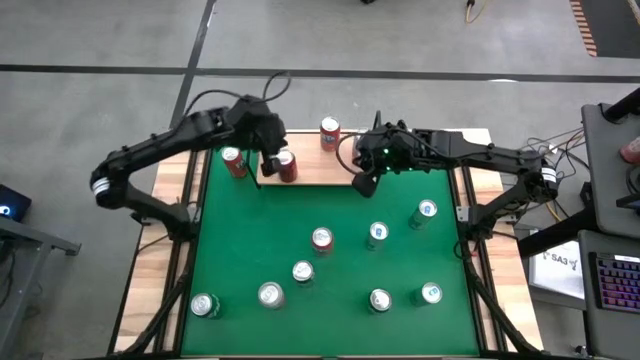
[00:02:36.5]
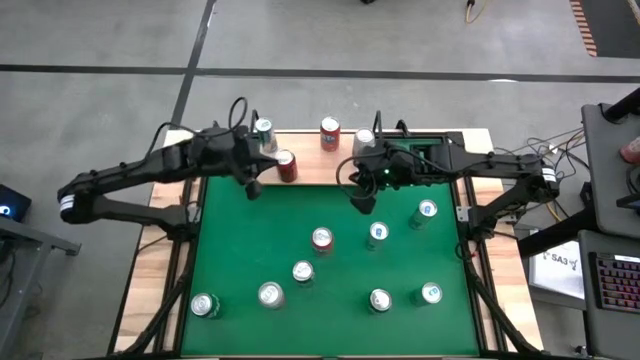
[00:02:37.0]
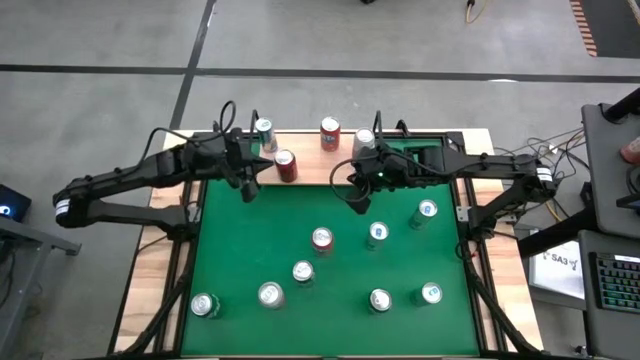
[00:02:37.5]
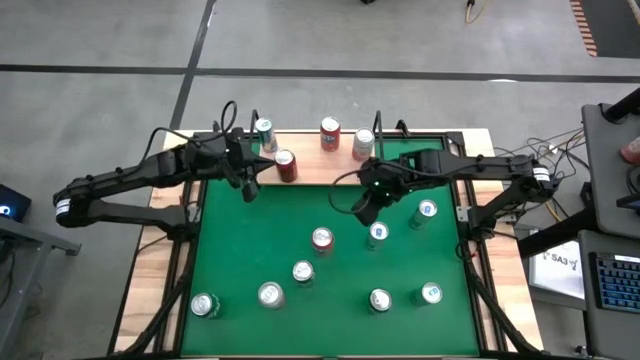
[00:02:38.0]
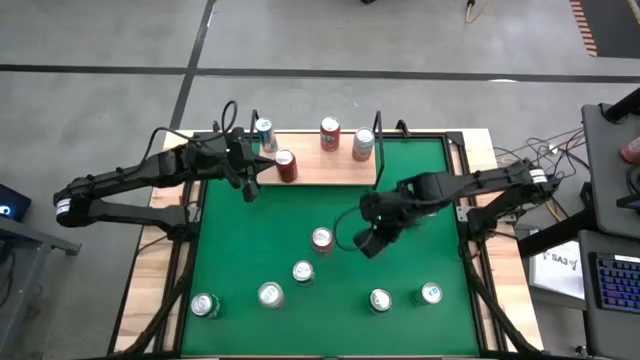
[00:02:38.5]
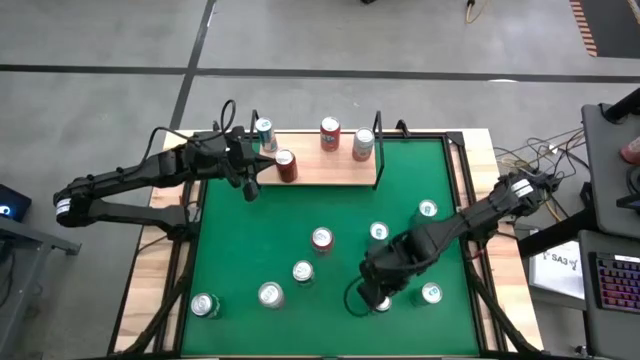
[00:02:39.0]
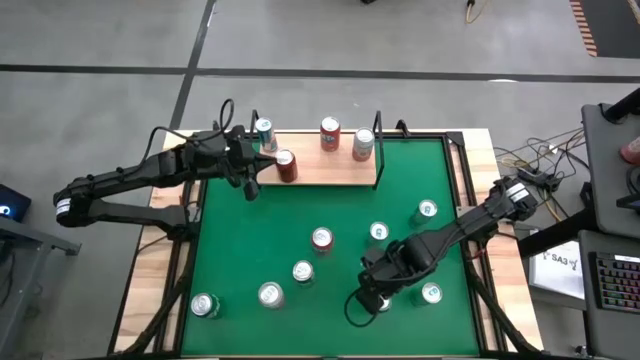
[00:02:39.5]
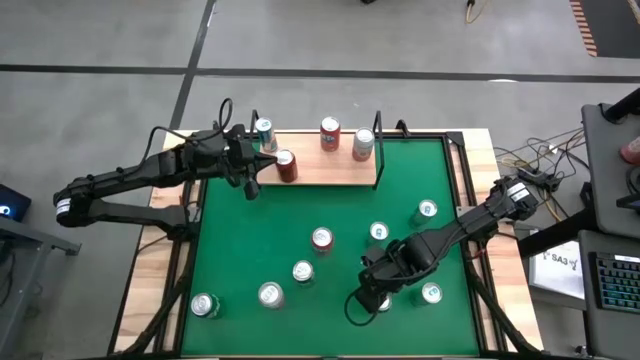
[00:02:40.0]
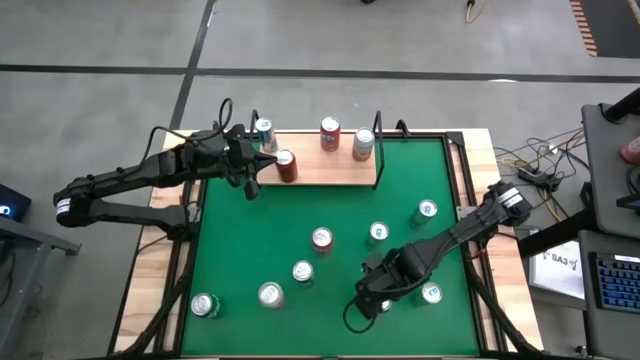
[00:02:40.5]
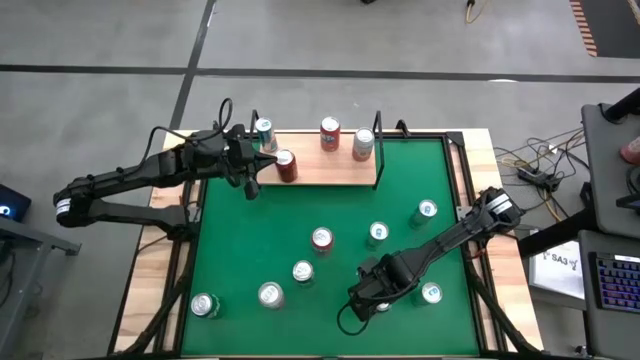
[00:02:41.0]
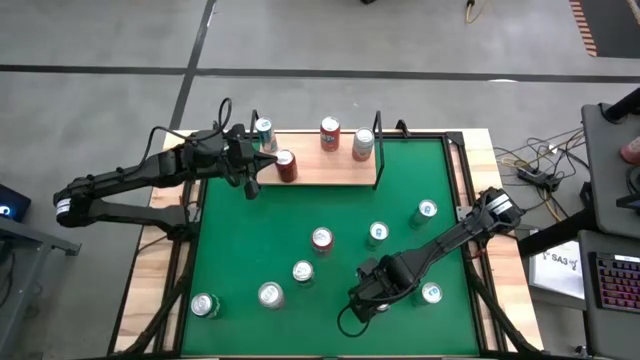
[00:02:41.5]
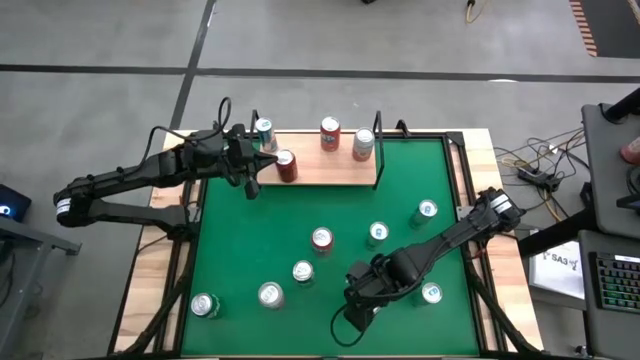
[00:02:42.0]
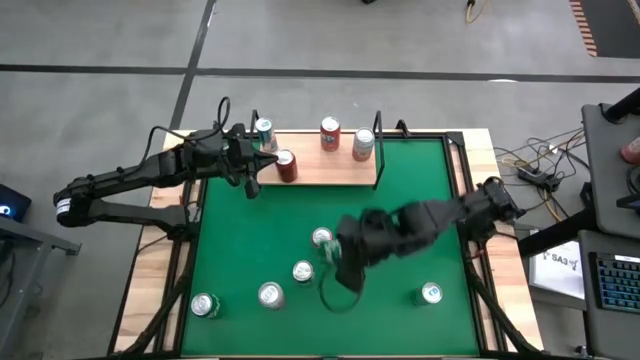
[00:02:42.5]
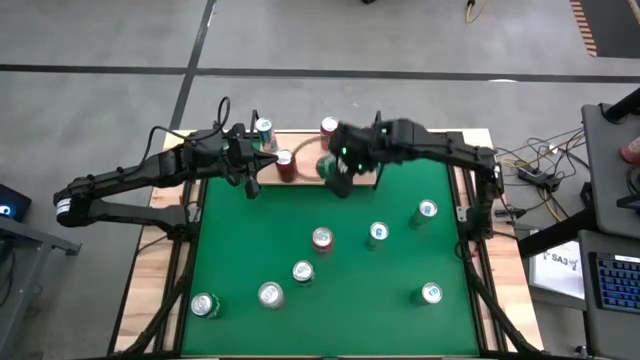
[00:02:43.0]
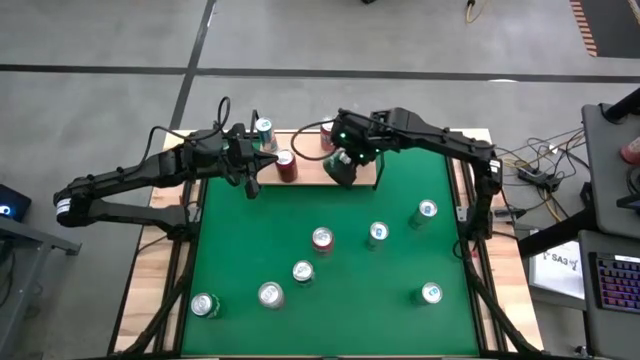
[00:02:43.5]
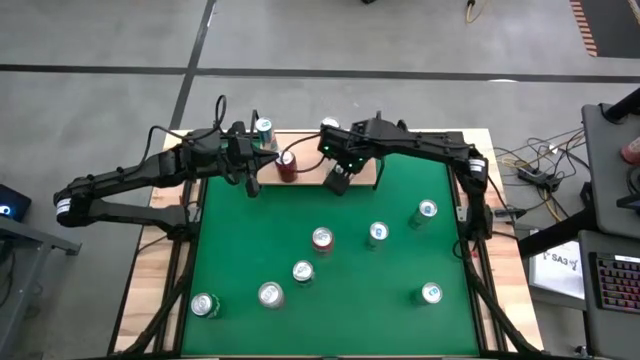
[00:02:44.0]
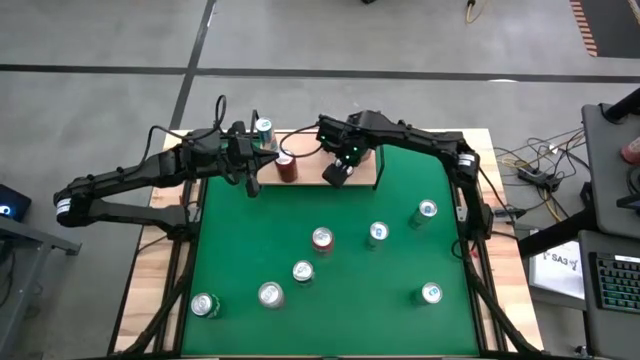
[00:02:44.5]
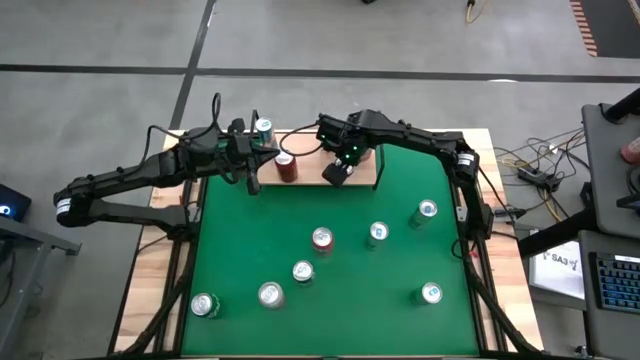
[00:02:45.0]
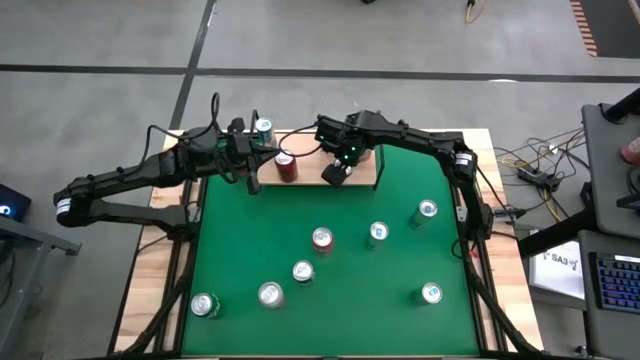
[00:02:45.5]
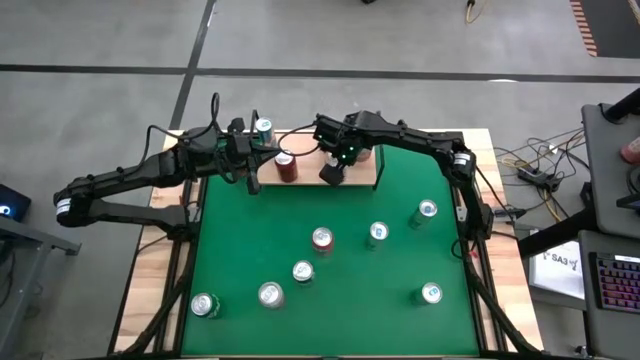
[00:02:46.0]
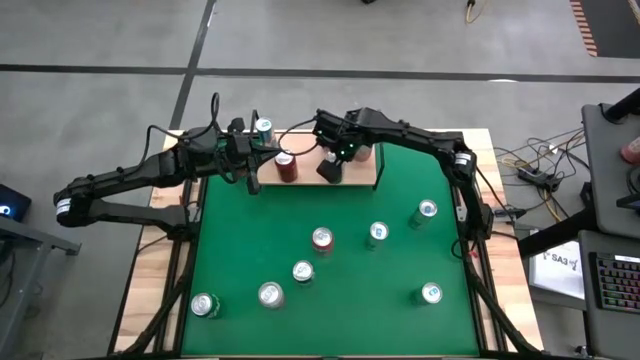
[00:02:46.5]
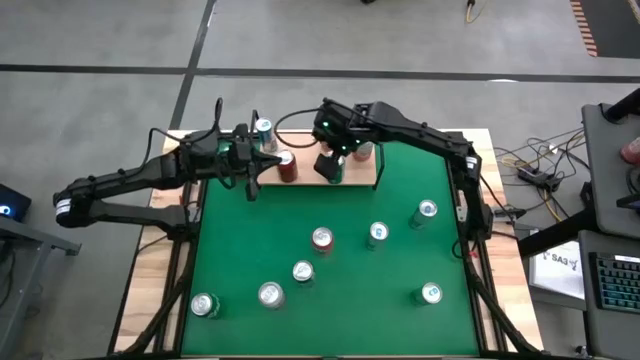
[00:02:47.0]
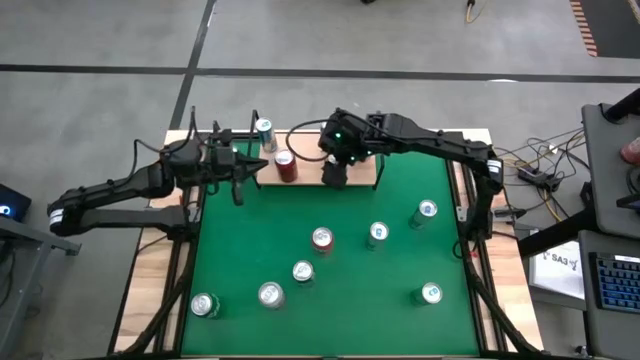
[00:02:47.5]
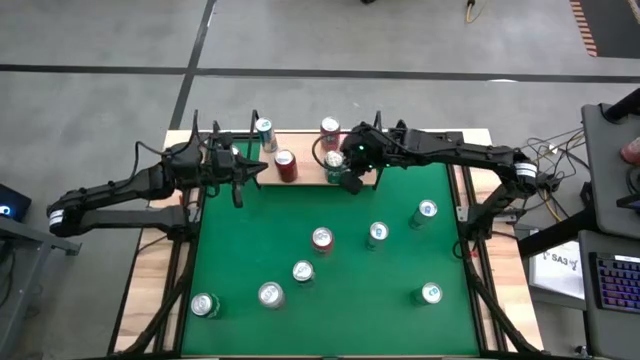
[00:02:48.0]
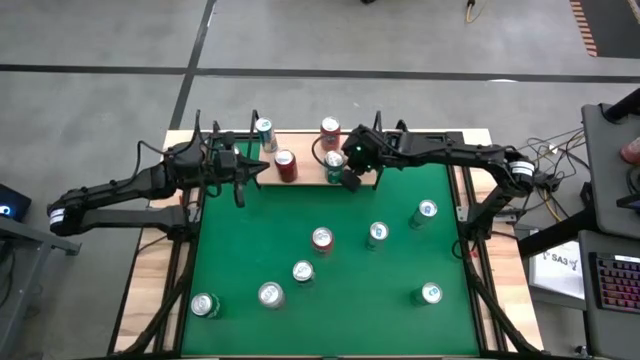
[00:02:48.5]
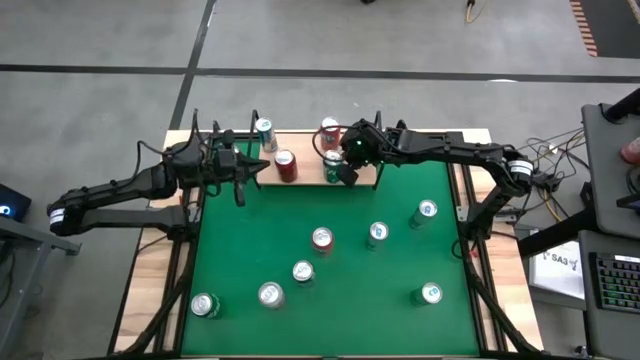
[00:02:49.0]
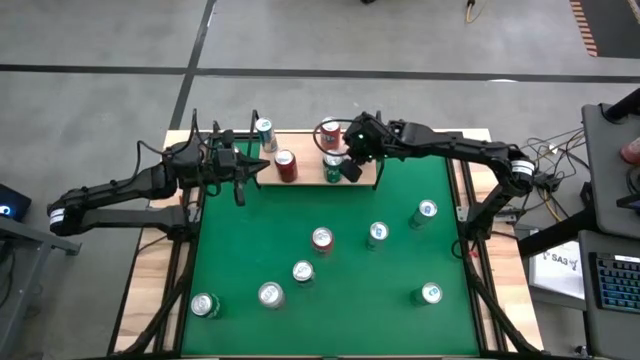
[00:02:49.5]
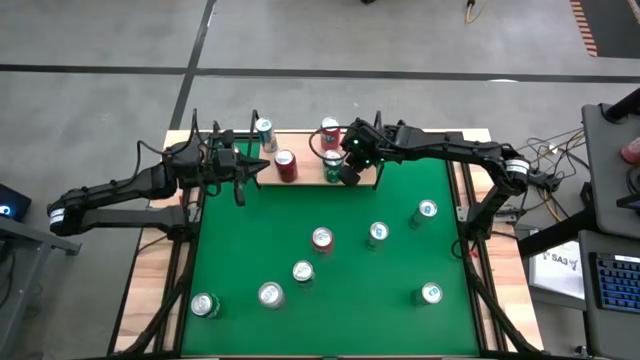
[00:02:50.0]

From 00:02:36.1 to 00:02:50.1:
Task: Pick and place cans onto a shelf
Put the right green soda can on the shelf

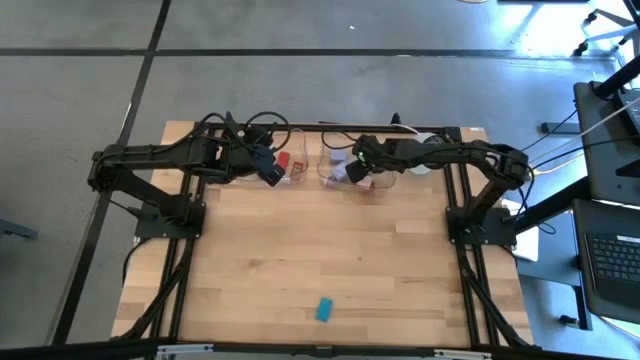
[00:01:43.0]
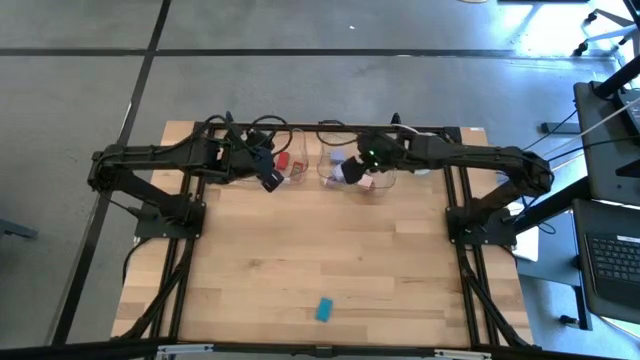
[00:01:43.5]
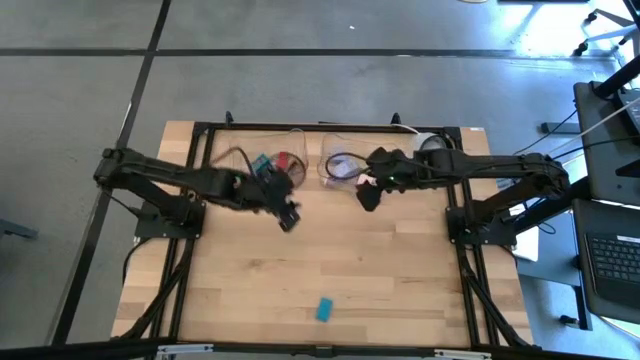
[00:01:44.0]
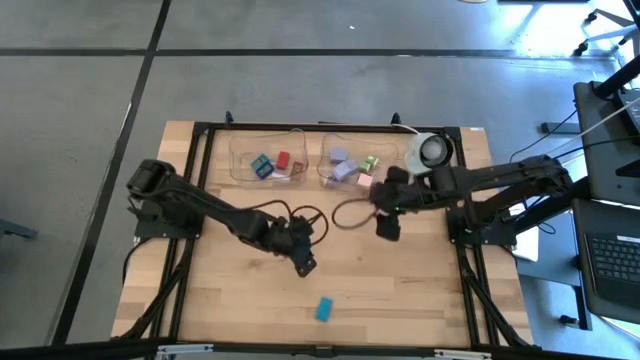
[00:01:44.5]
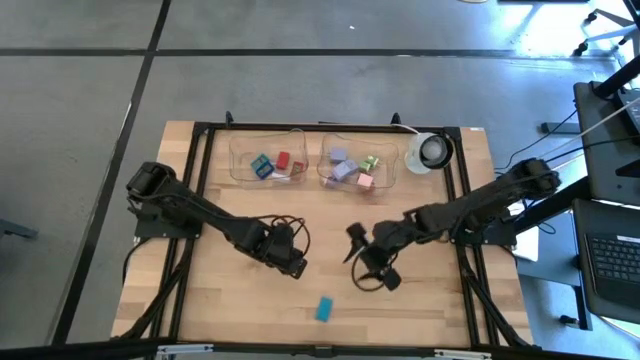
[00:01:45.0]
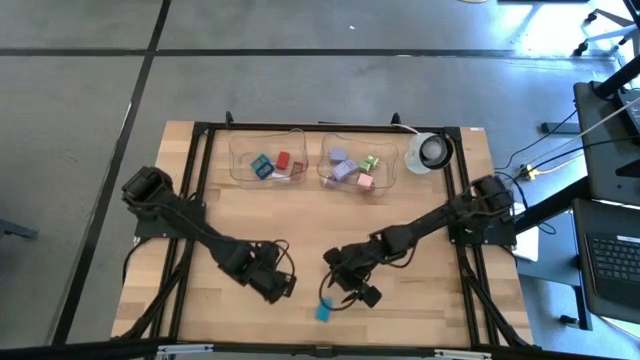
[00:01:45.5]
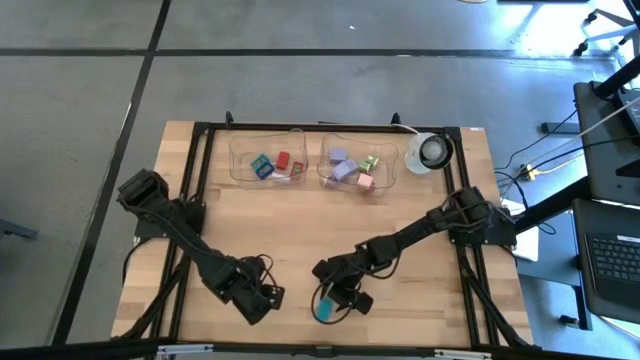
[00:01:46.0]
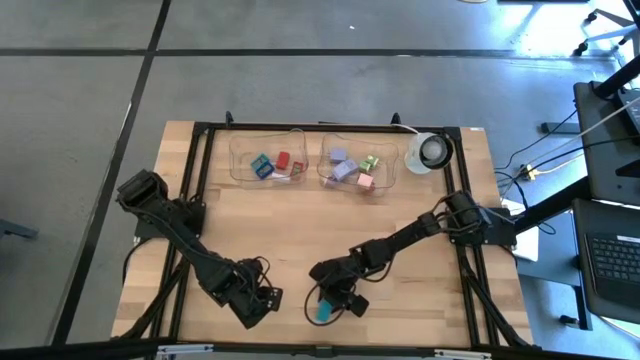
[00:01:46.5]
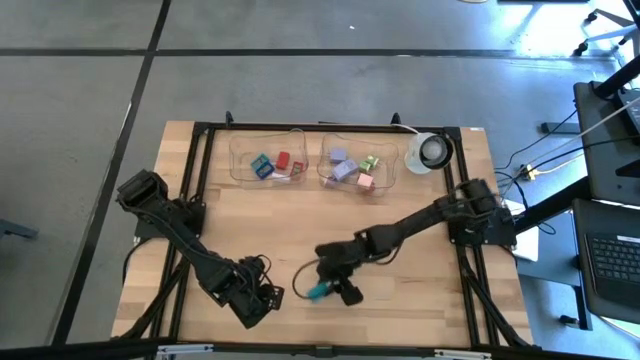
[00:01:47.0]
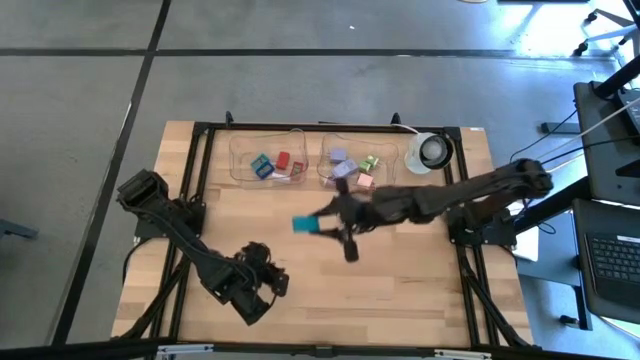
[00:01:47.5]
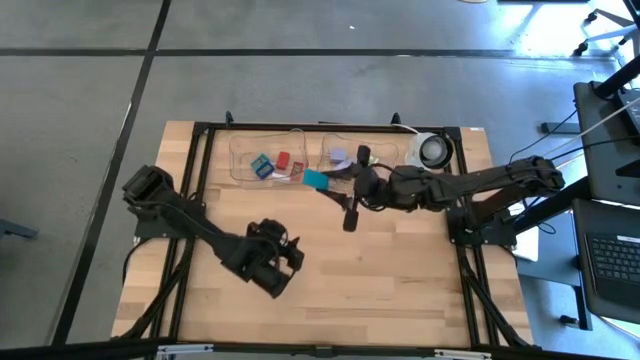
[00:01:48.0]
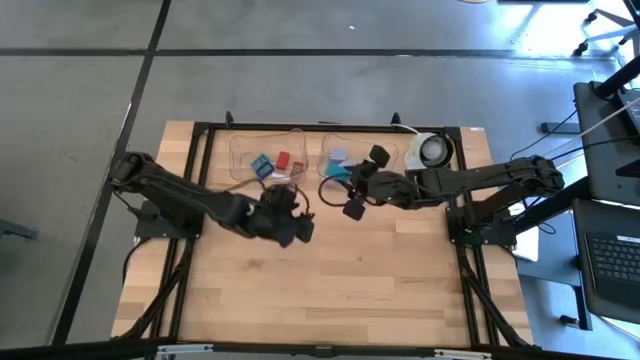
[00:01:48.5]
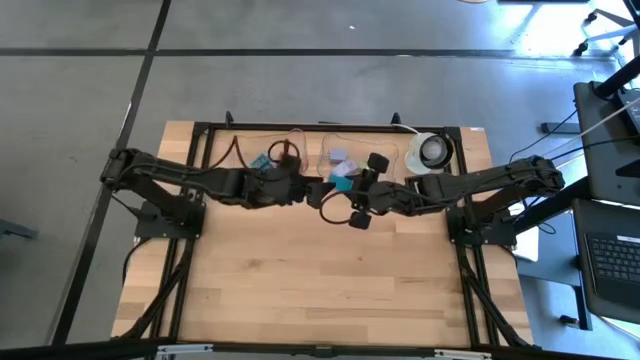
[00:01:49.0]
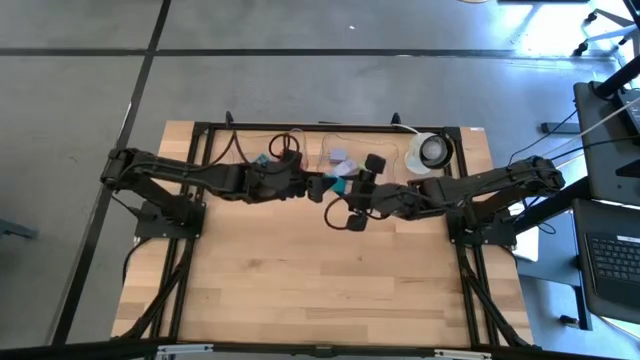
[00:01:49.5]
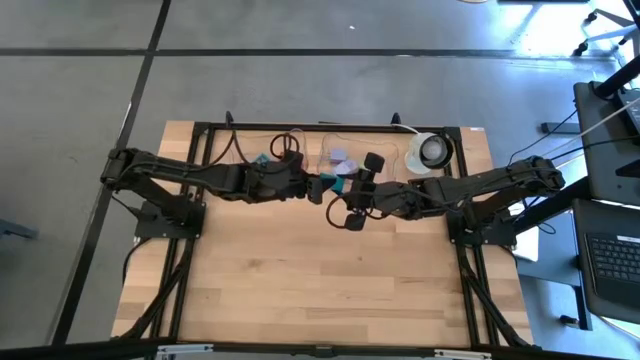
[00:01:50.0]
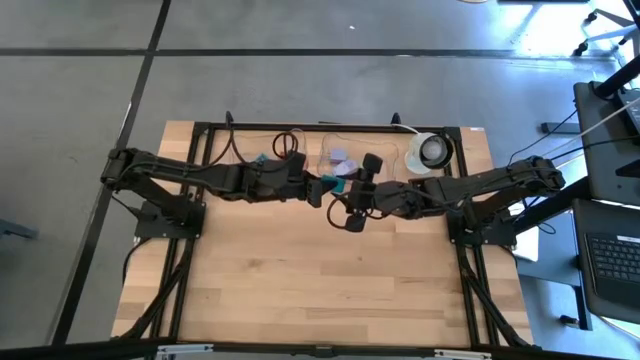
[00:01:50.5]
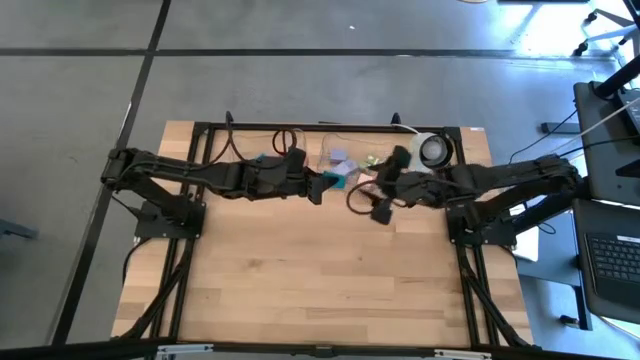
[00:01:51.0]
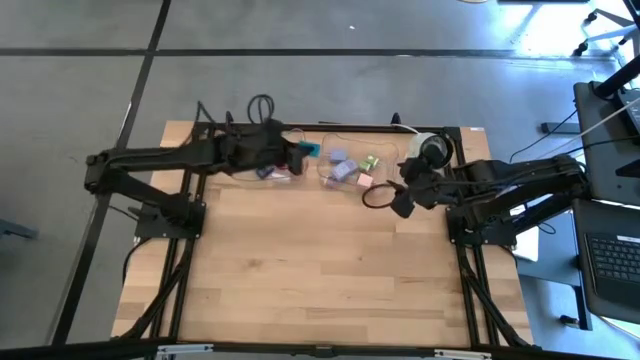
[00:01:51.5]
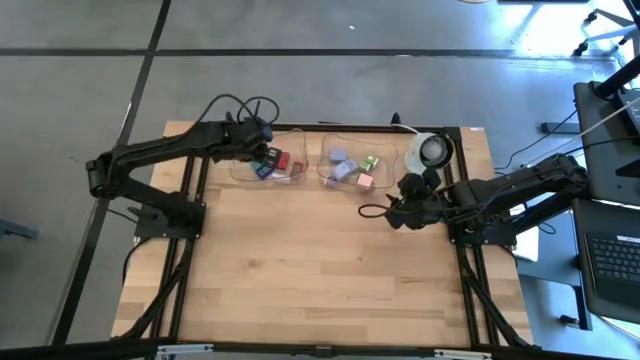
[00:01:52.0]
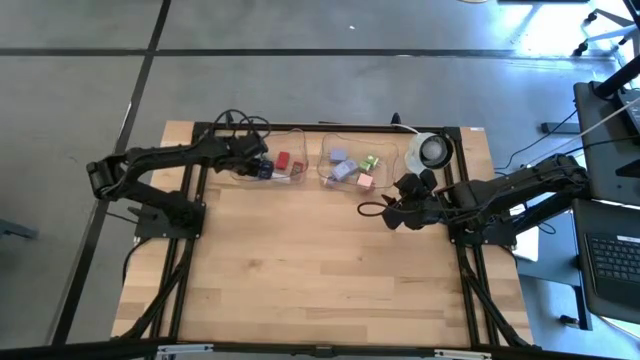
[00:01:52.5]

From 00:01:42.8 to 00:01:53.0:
Task: Pick & Place Office items
Put the light blue digital timer into the left transparent bin
